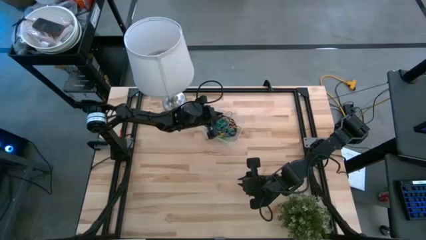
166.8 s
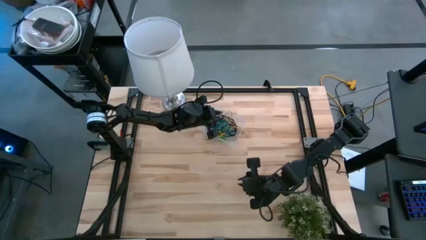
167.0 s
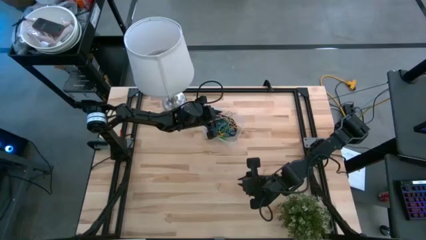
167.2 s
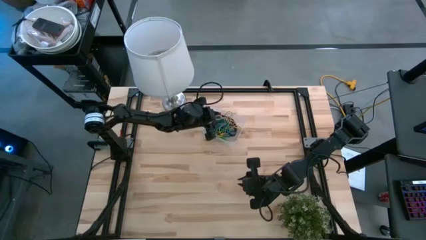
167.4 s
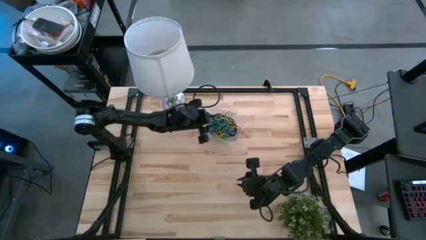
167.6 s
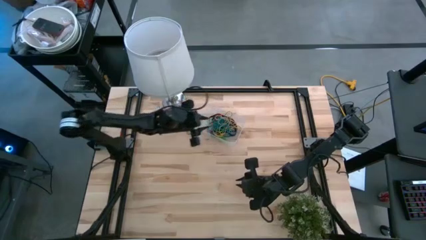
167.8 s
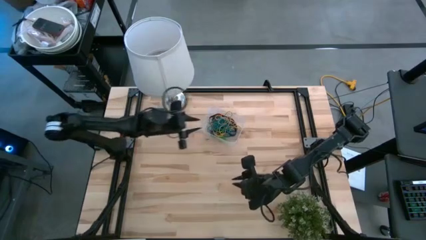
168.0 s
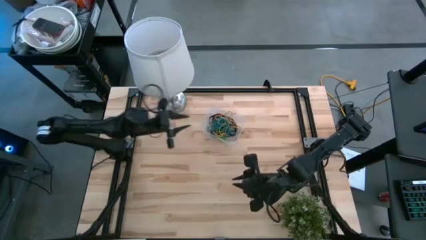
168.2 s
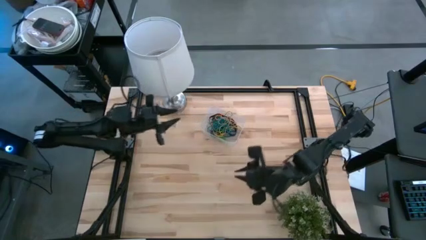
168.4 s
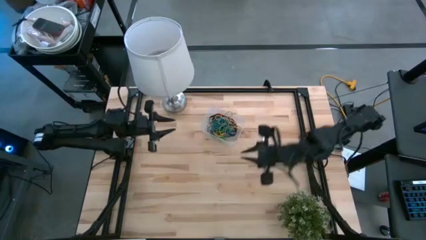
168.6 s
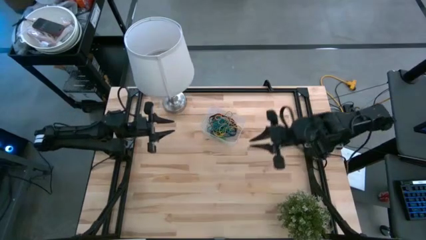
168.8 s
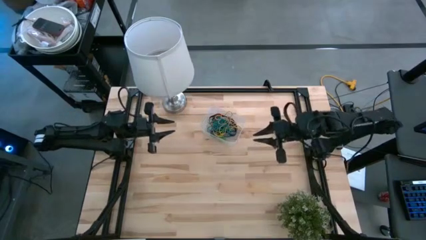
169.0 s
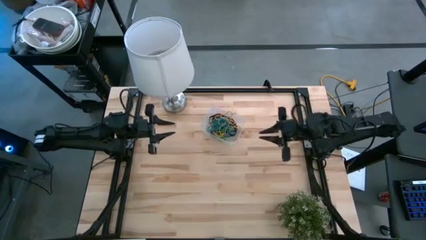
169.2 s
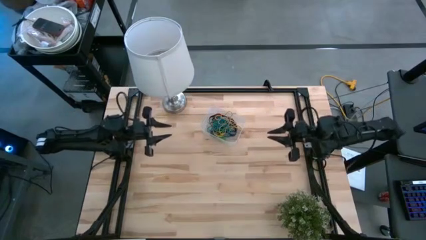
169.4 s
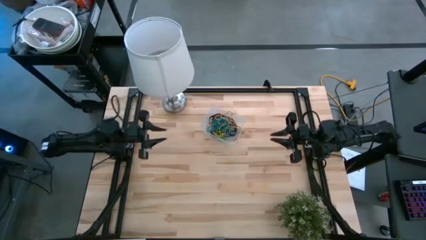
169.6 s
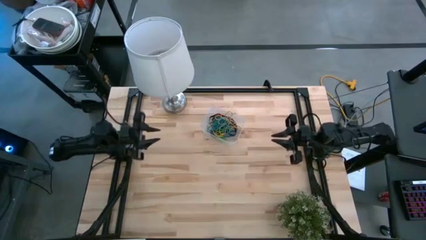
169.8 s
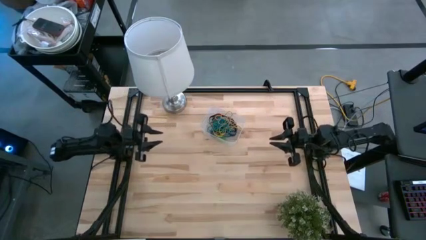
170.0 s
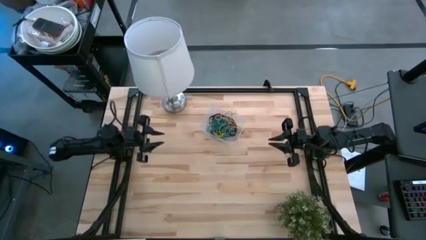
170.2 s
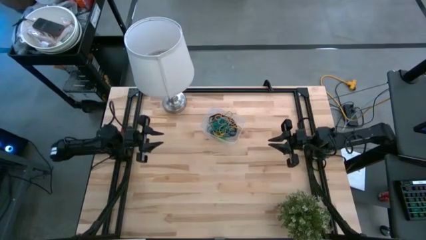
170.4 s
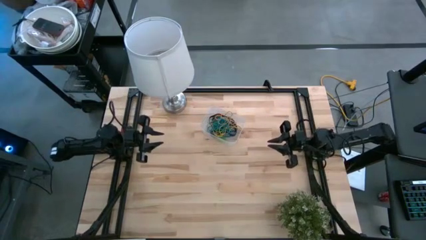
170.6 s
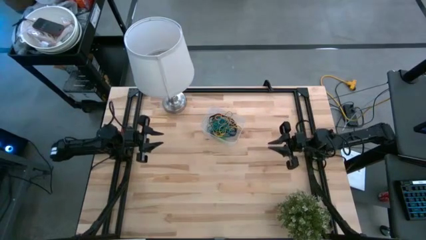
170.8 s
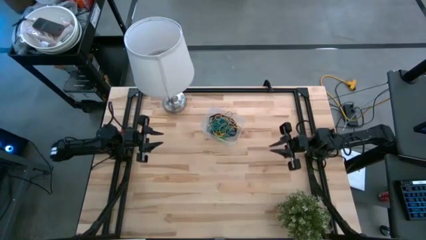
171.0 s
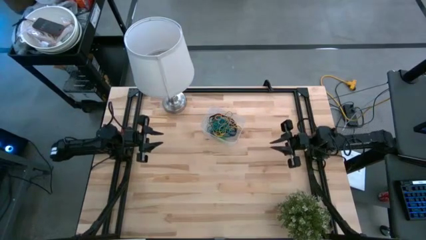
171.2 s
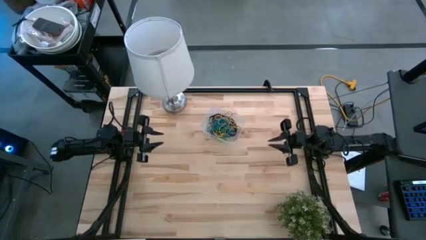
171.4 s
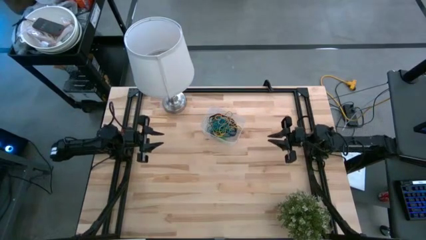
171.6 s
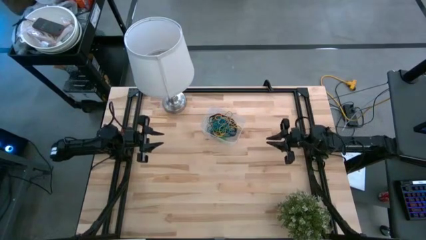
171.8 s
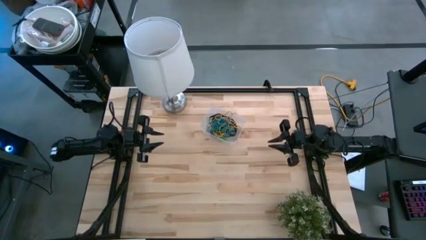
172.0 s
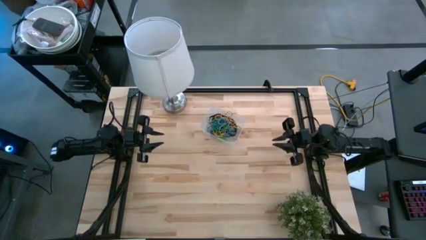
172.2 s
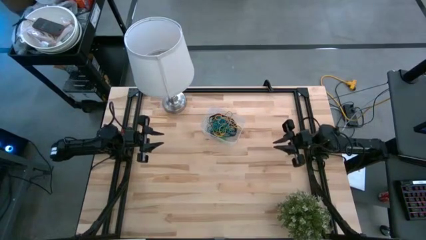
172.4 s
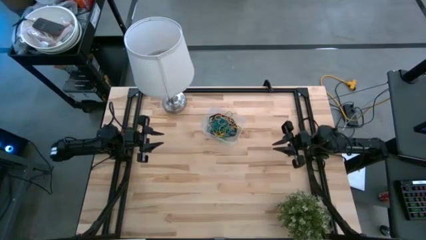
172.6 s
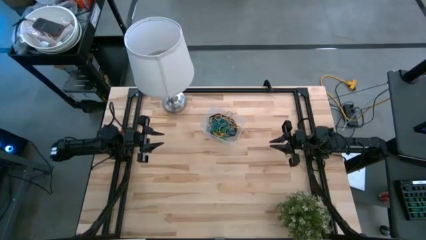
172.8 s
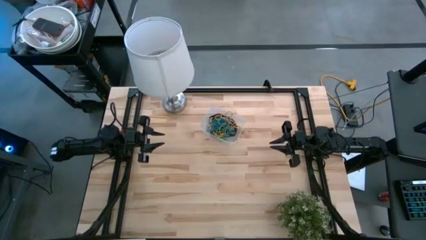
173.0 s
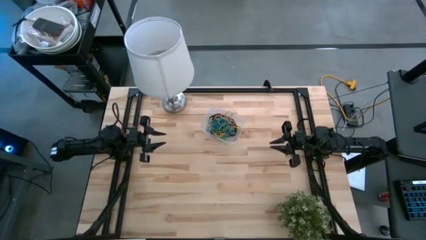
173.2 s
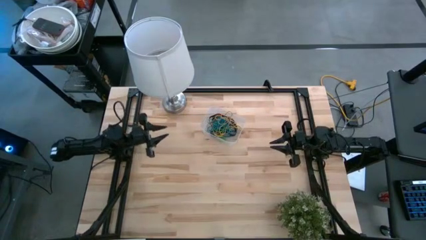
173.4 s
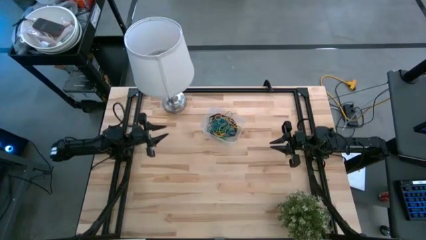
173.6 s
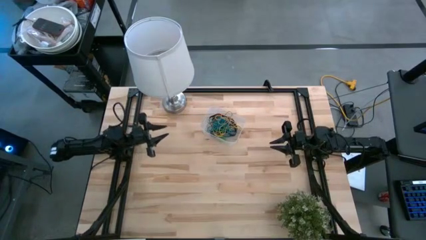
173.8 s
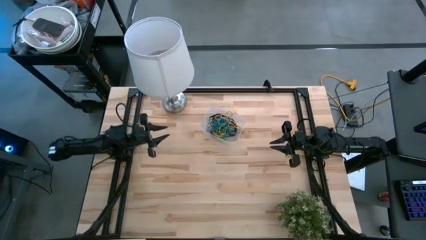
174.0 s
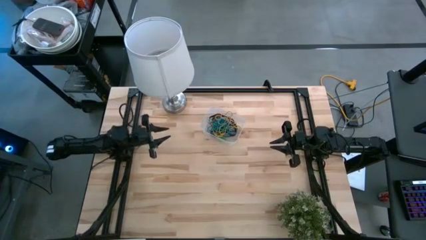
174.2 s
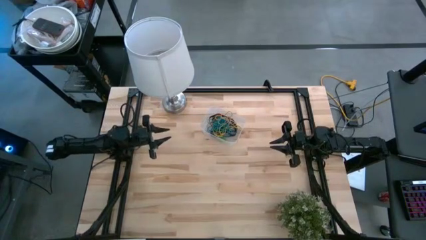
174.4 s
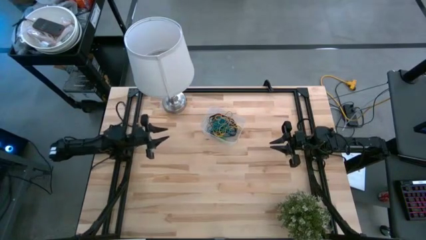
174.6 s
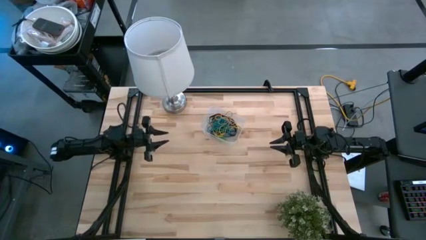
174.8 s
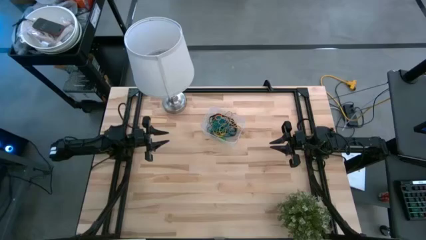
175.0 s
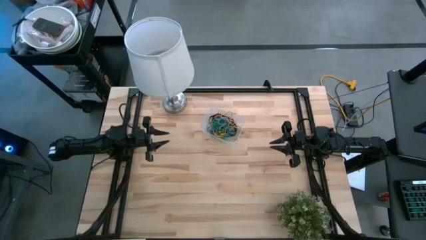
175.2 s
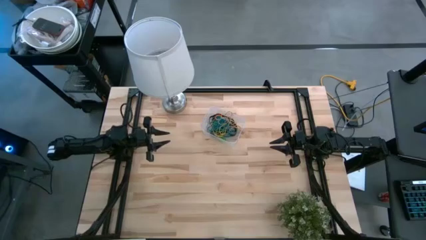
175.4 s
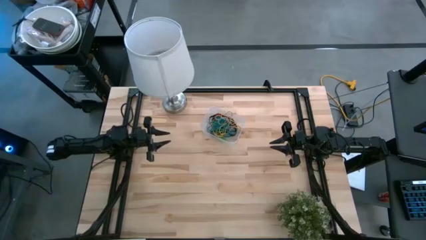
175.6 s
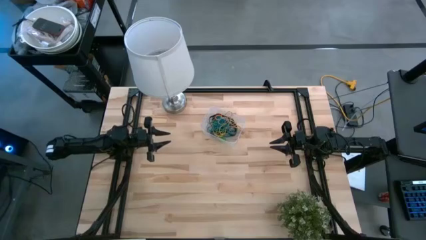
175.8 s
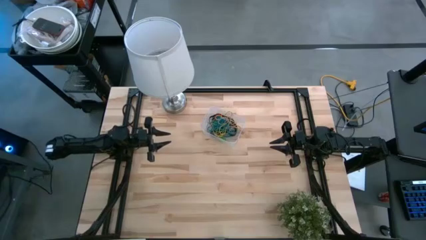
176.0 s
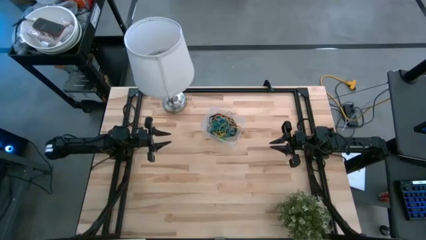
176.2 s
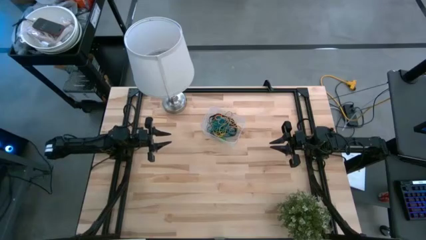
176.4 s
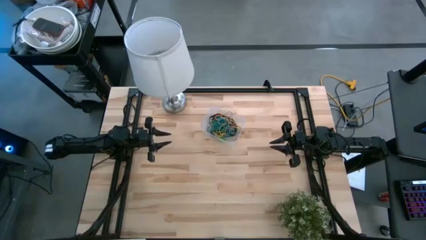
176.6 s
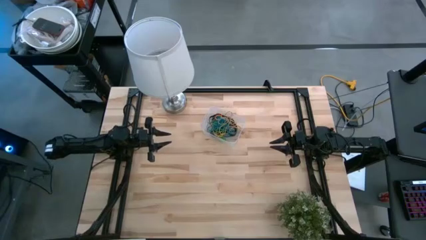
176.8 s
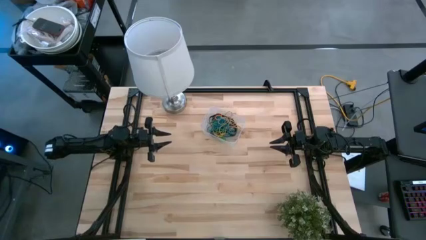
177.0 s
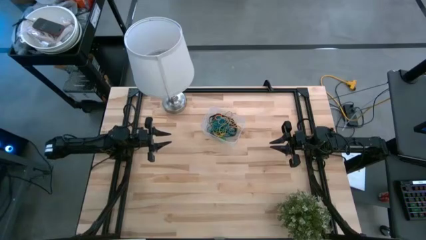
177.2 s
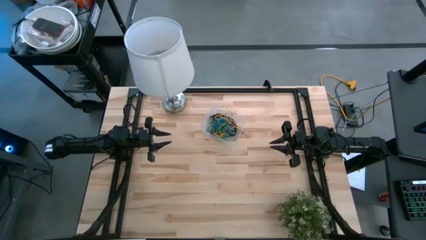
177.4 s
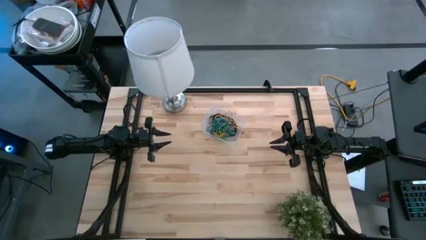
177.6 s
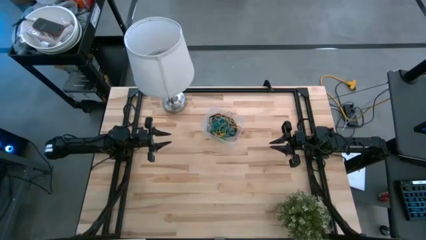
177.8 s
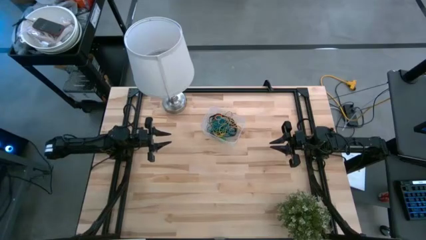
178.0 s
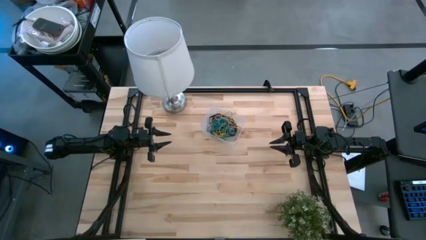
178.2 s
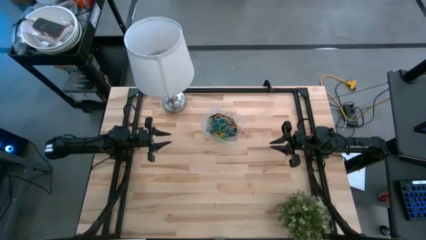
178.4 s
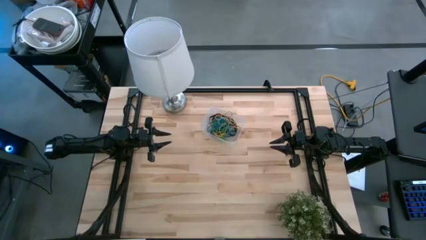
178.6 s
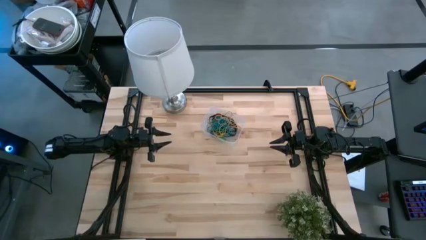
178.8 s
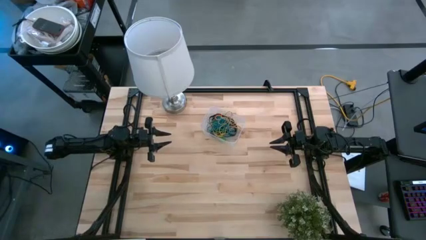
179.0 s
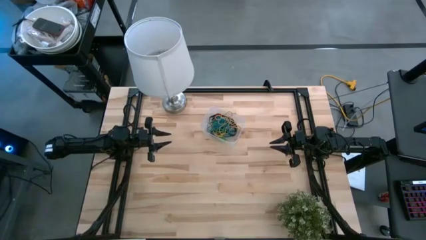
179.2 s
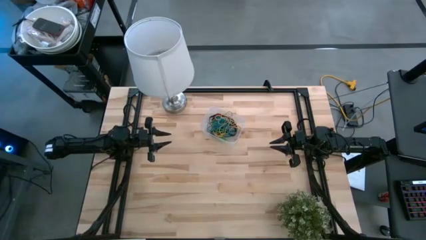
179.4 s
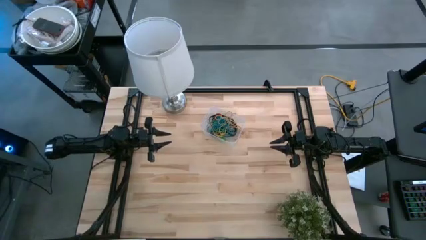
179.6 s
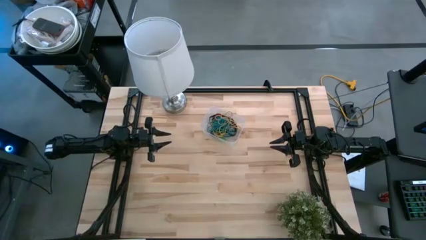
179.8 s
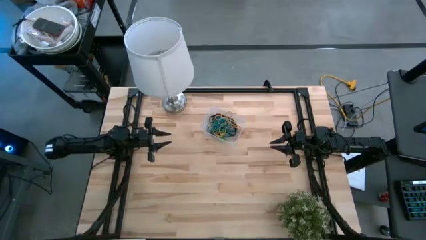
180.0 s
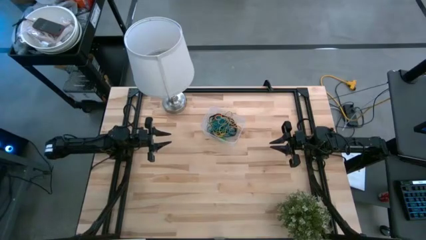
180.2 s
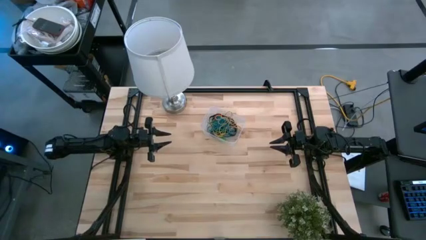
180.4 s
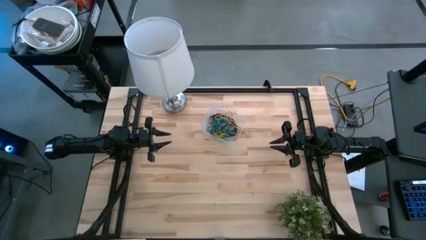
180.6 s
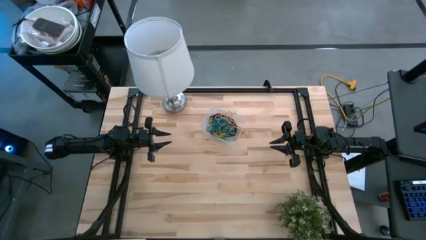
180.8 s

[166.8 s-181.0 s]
Task: Pick and place rubber bands into bin
Return to Home Position

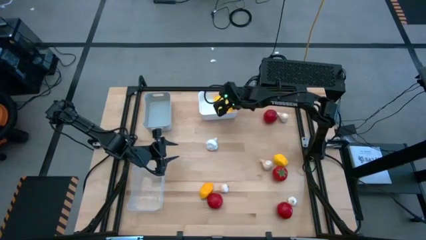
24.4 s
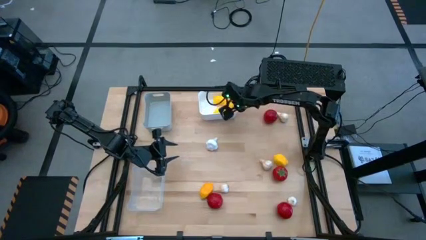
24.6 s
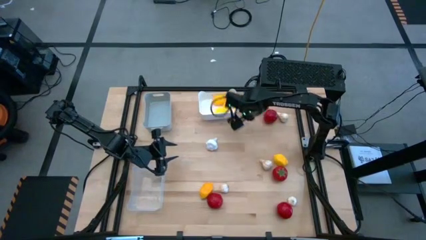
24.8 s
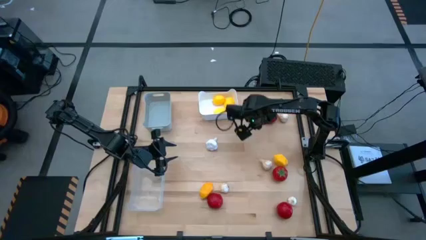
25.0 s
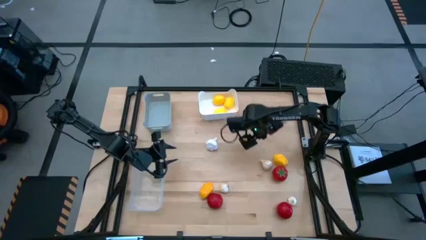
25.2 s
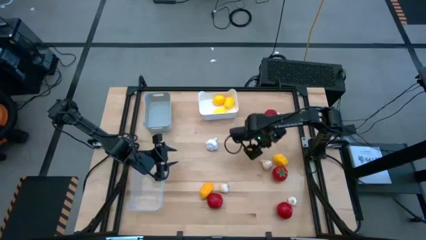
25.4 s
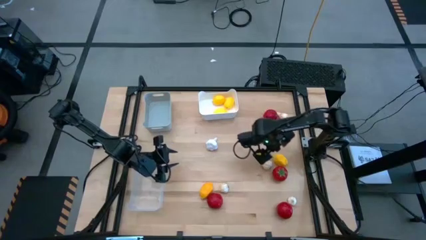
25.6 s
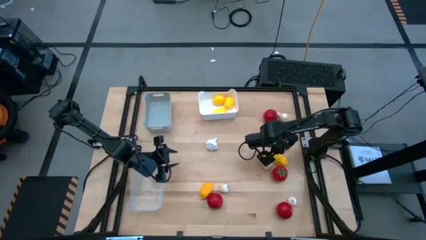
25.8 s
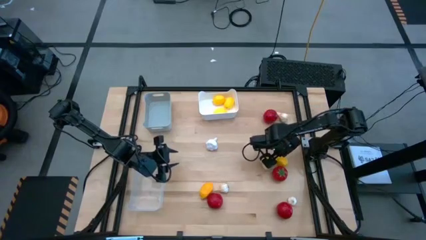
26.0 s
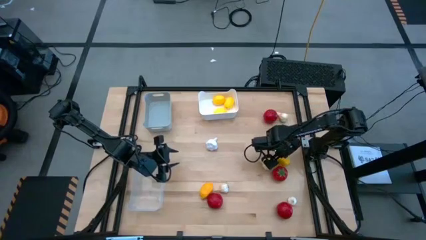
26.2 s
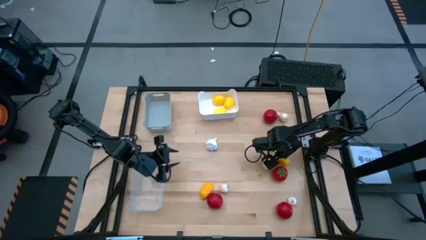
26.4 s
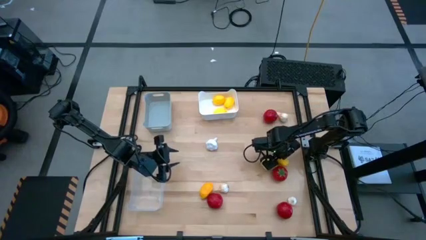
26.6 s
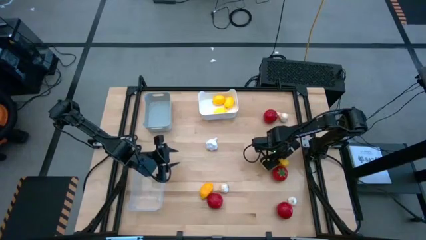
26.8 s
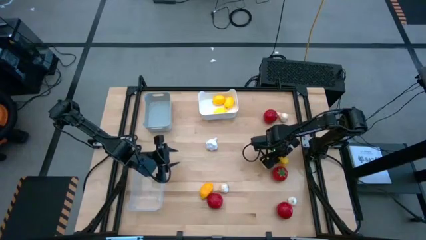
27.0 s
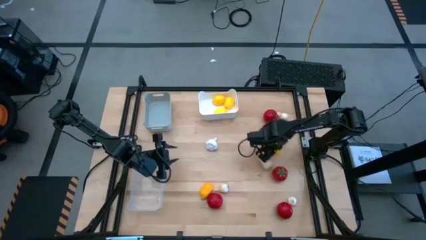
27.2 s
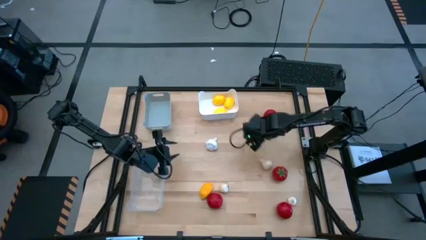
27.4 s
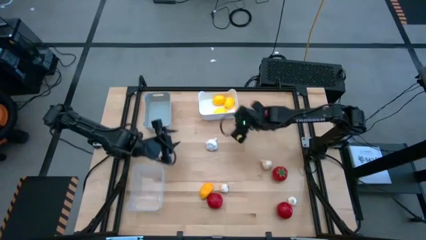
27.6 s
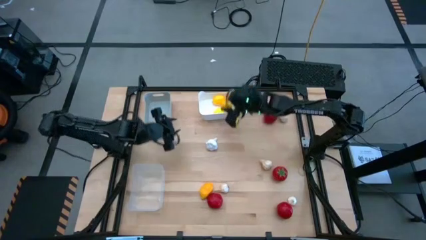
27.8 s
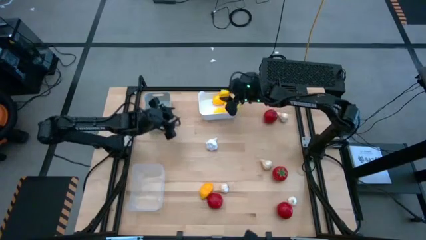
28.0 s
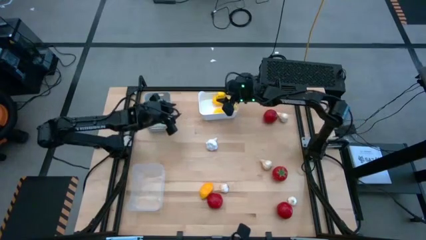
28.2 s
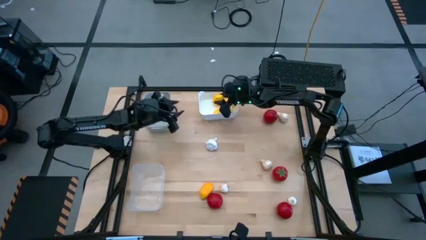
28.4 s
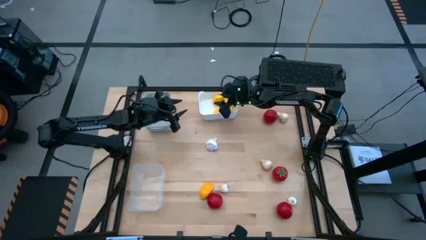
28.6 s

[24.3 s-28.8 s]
Task: Sort produce into baskets
Put the lemon into the white bin
